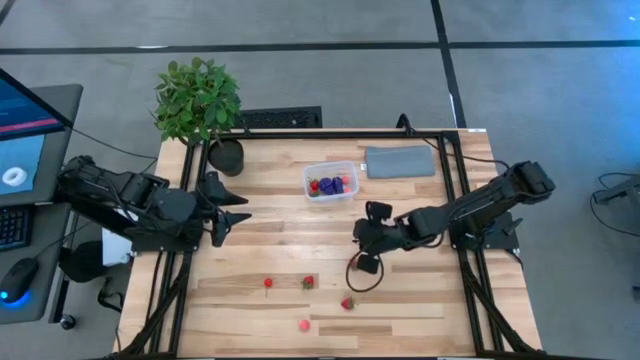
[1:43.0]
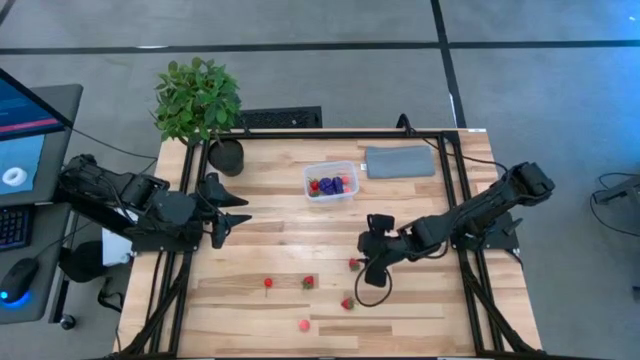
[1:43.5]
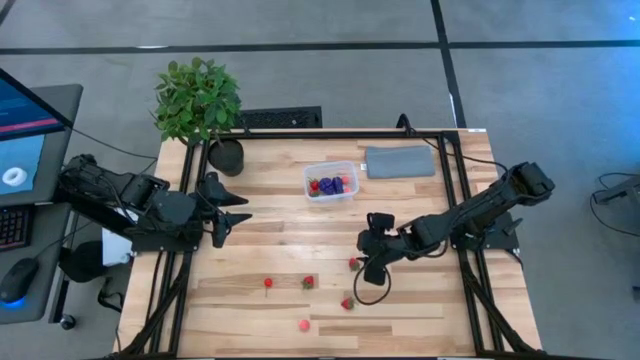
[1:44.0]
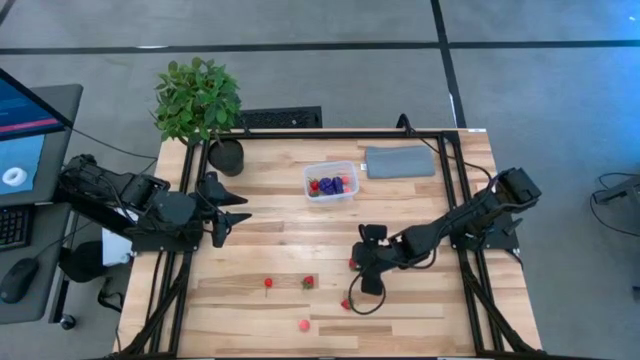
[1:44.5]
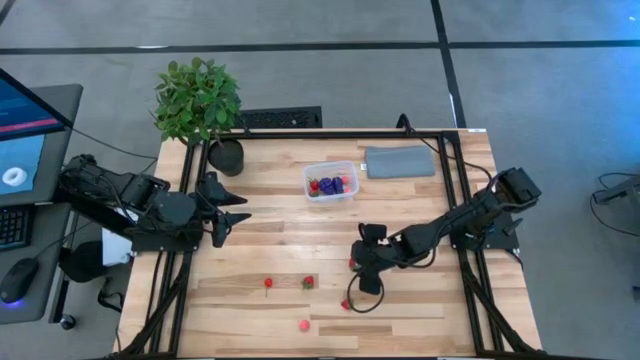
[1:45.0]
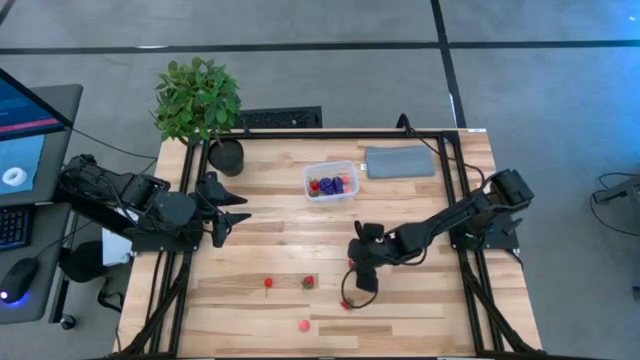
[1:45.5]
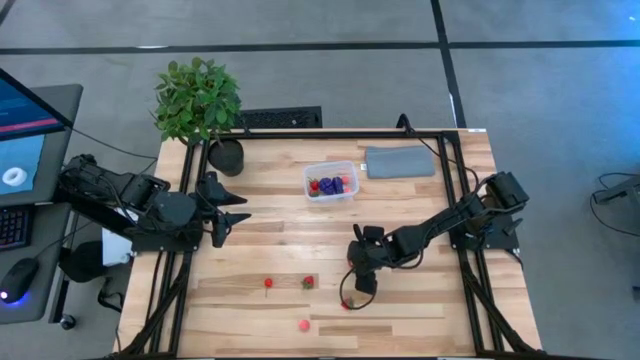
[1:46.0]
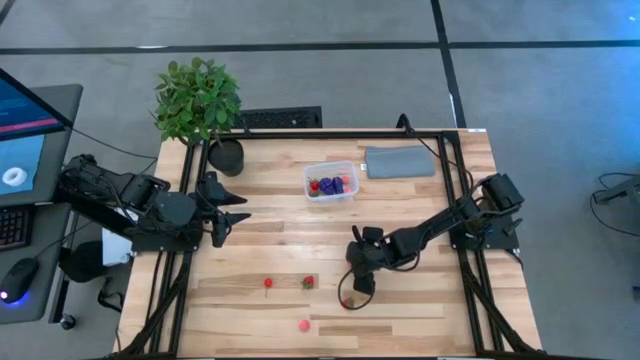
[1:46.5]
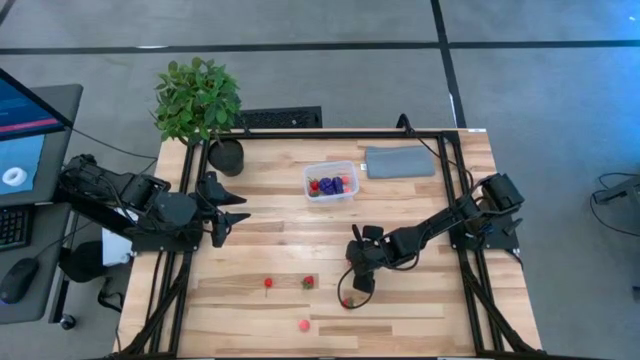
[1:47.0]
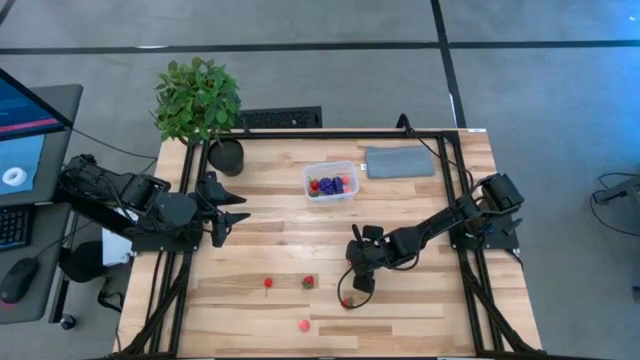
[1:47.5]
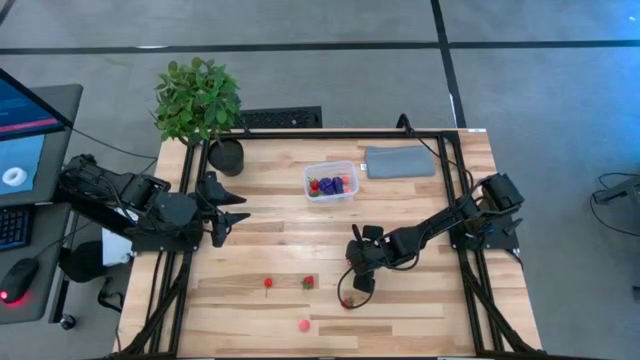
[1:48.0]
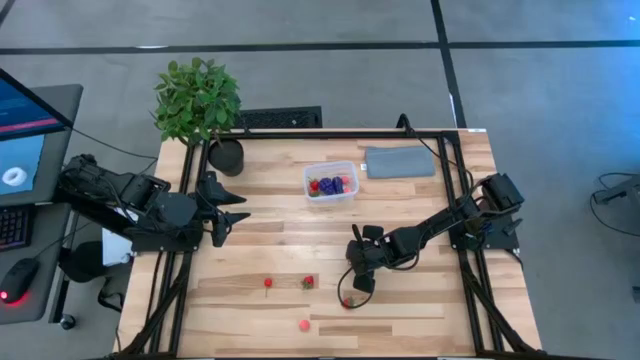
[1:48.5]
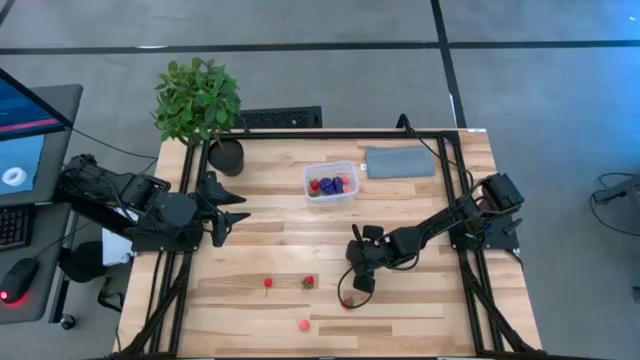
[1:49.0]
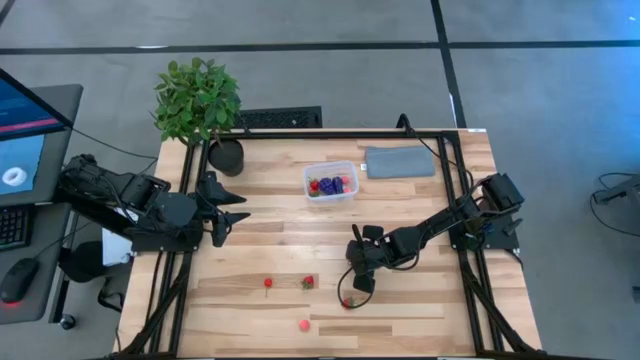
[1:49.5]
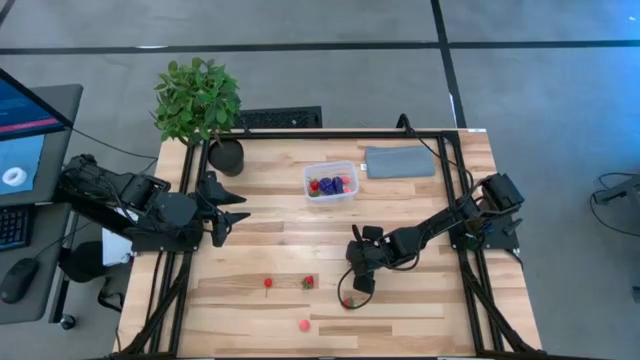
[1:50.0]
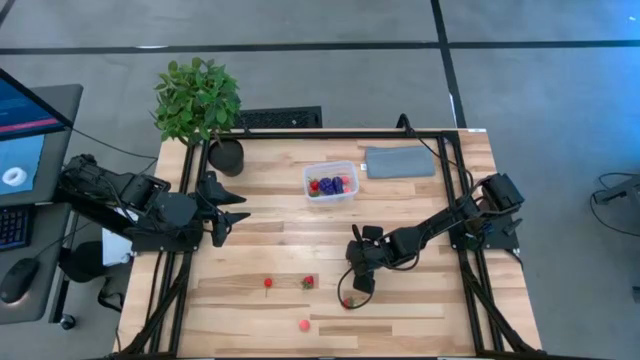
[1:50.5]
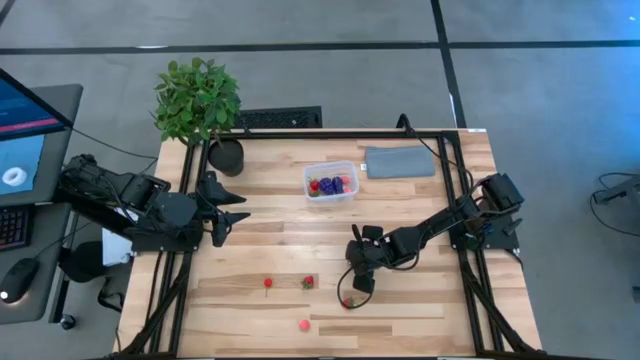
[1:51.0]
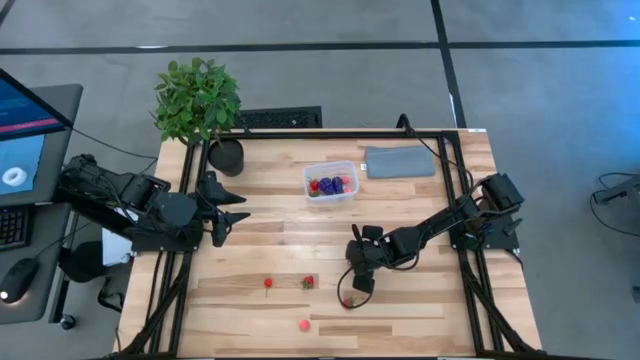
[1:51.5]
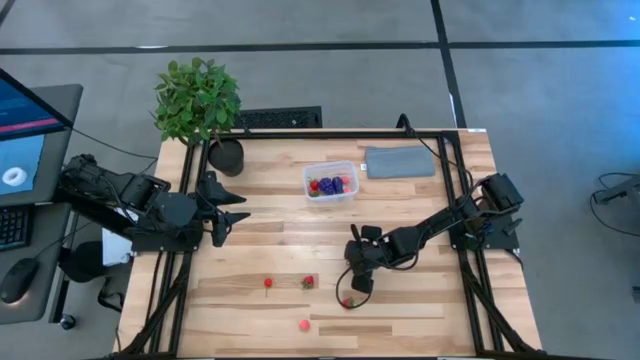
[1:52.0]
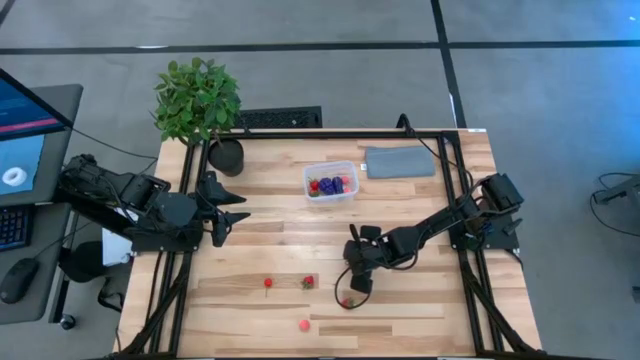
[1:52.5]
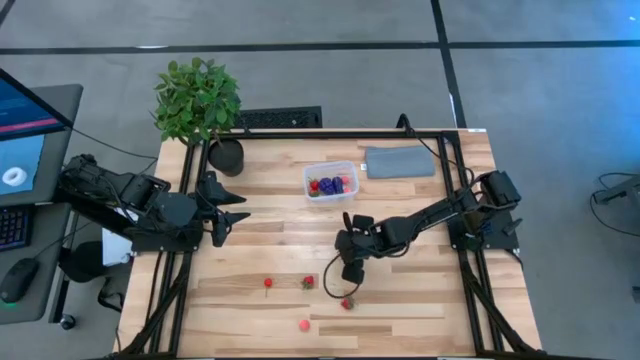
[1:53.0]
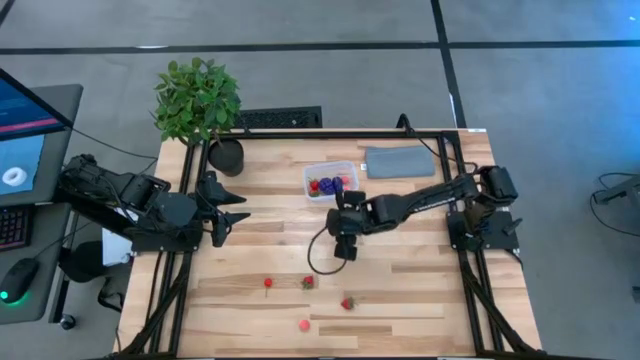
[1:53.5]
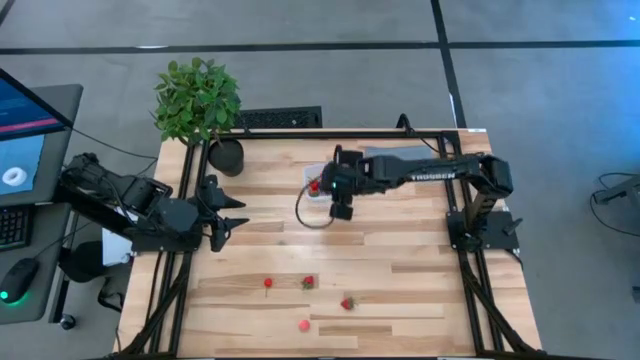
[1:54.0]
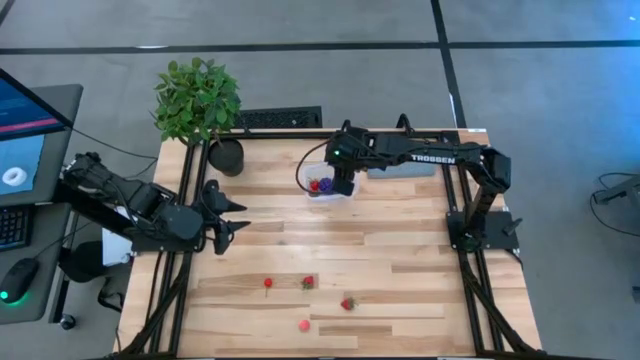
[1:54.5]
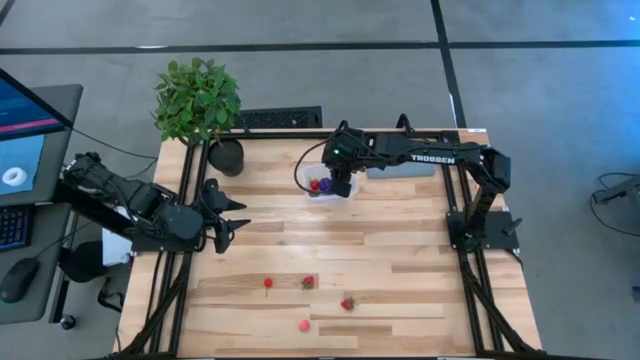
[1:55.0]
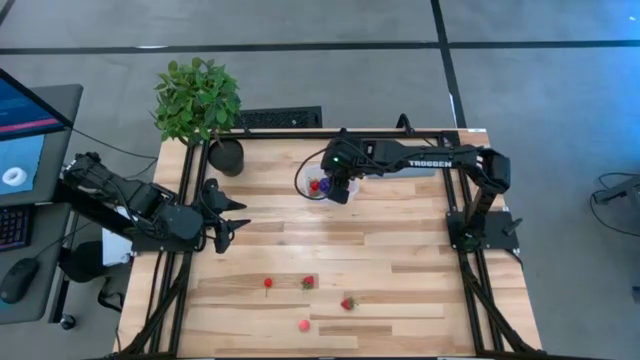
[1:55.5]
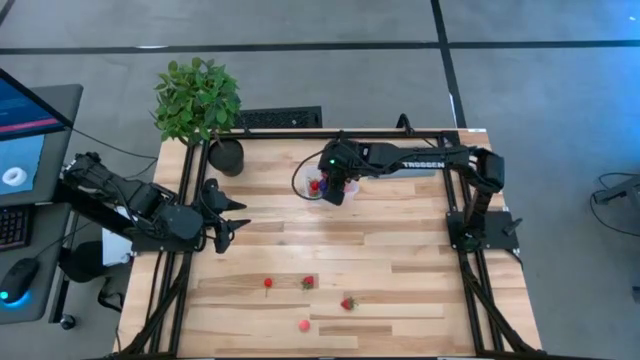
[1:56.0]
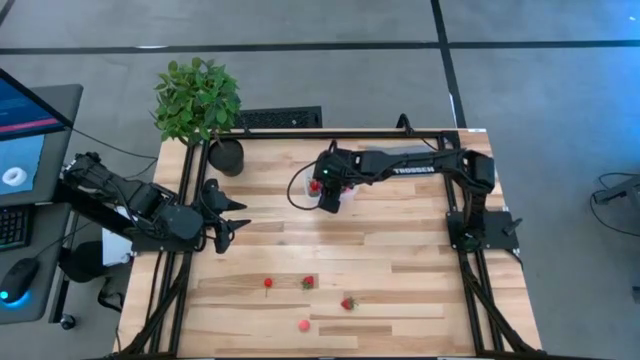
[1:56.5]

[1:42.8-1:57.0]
Task: Pick and placing Produce into tupperware
Put the strawberry into the container

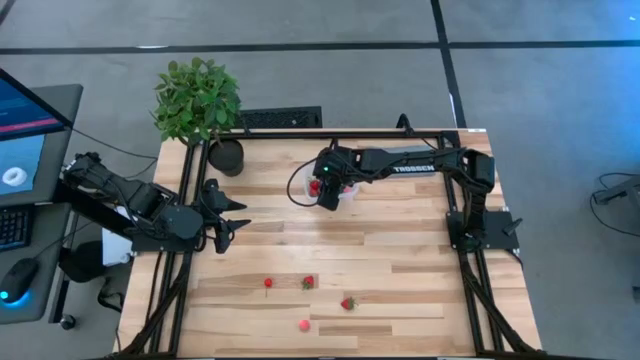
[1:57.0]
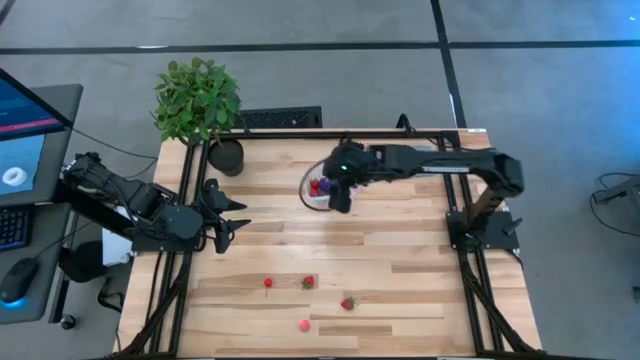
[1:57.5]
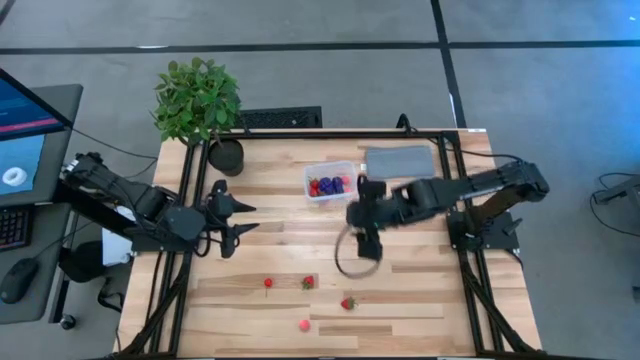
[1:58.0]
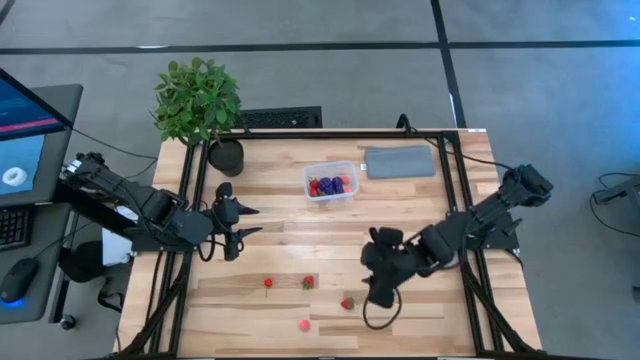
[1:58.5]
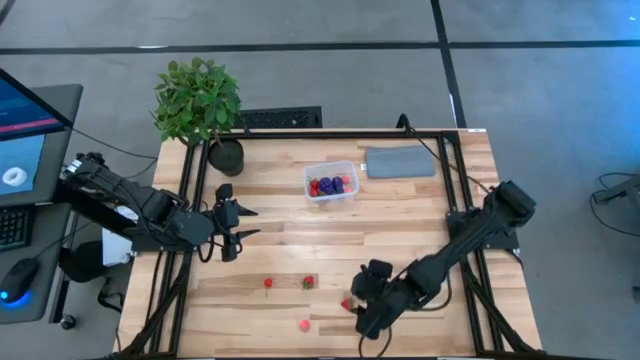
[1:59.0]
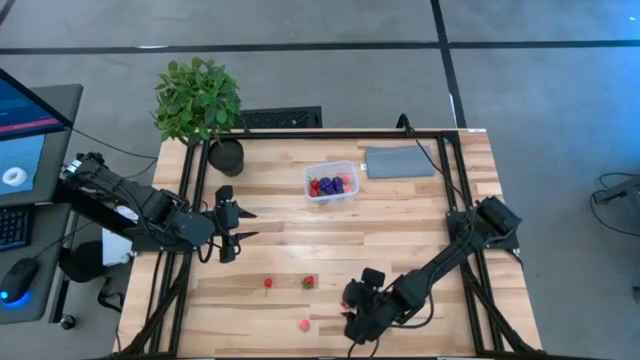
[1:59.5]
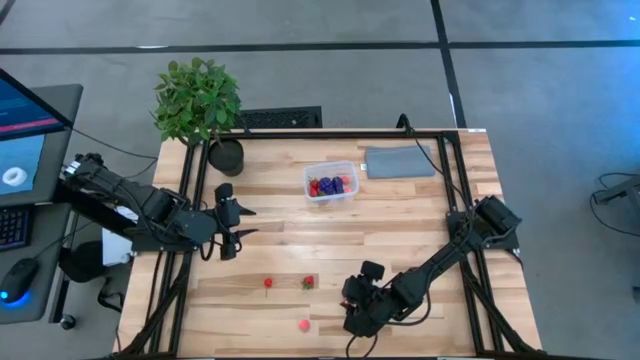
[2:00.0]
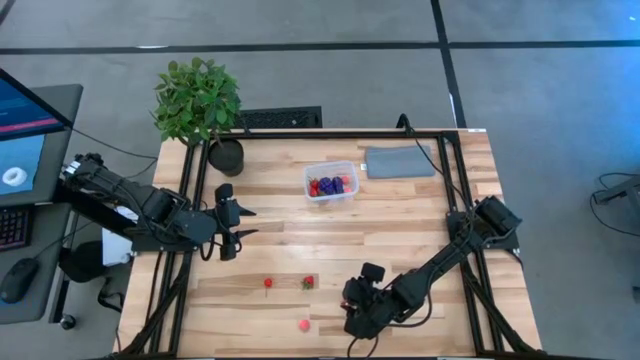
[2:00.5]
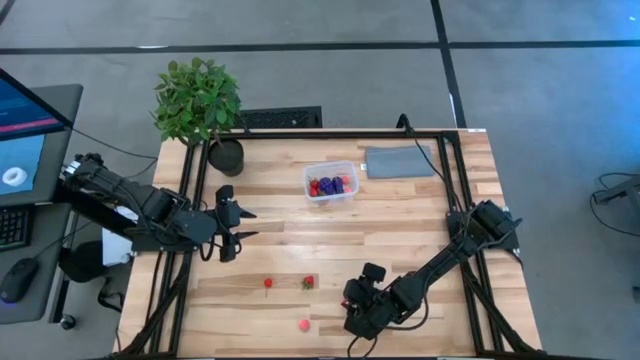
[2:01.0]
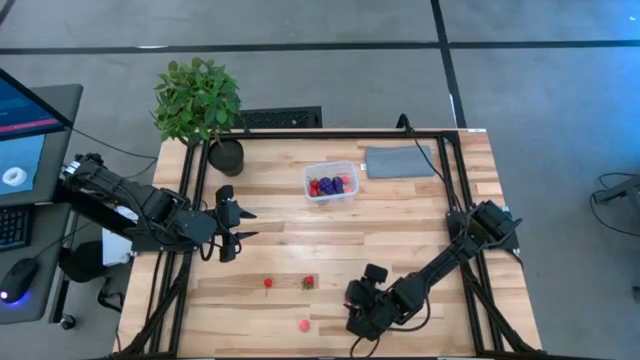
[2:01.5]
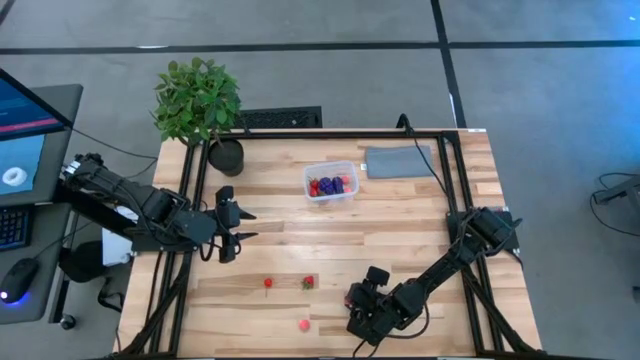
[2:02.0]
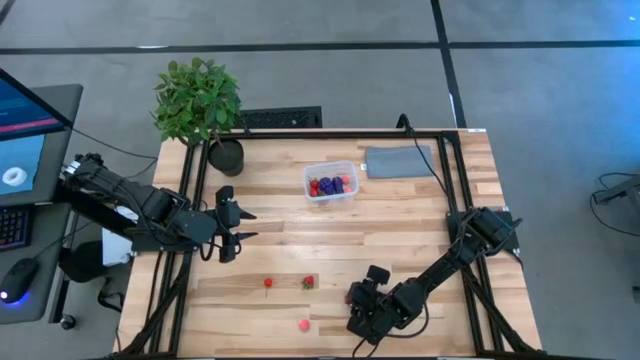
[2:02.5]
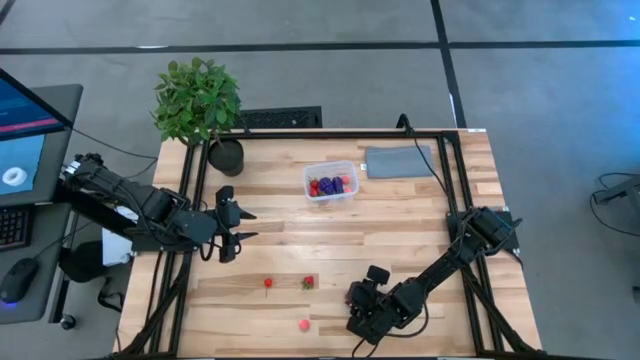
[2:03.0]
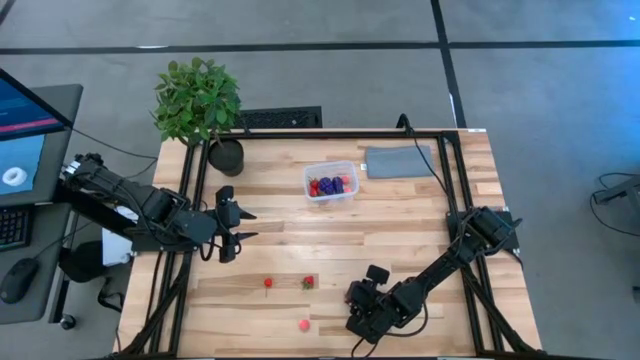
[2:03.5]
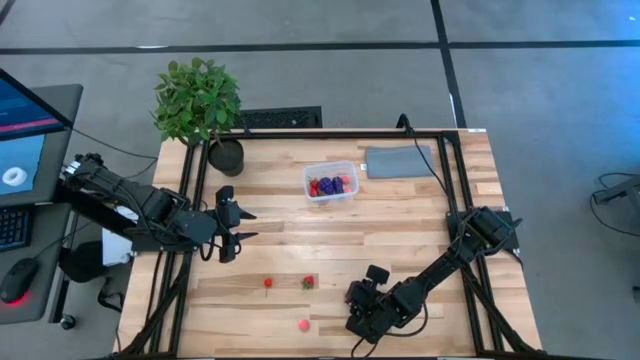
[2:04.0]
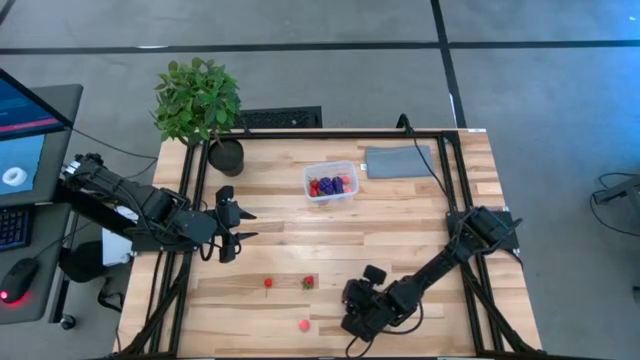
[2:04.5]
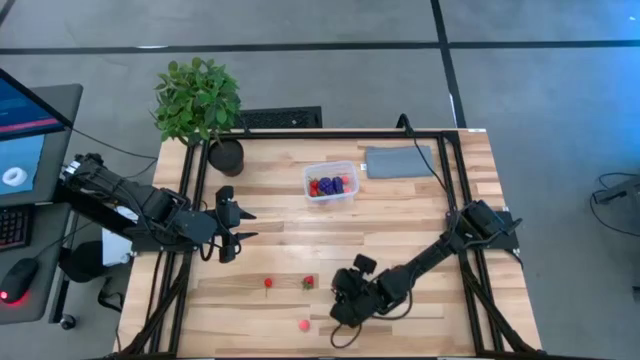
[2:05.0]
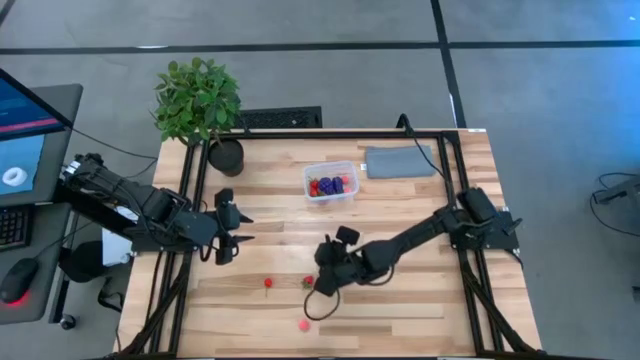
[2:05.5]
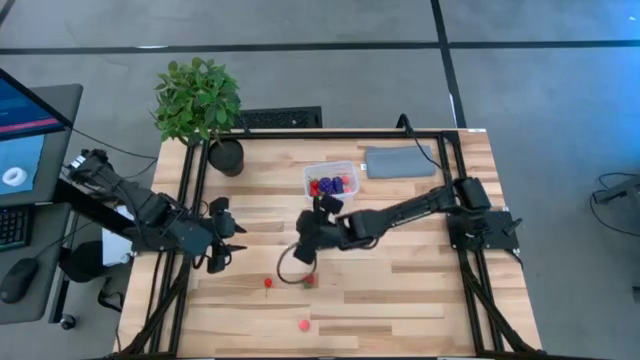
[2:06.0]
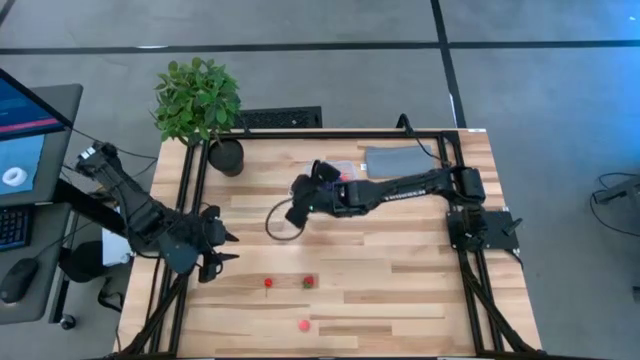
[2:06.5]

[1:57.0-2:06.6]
Put the strawberry into the container
